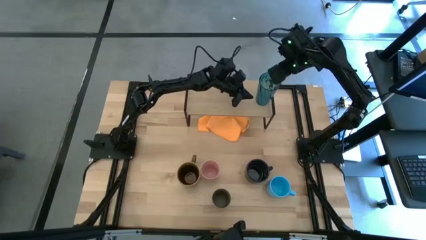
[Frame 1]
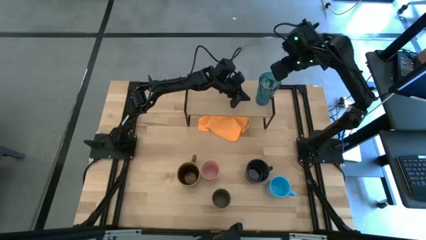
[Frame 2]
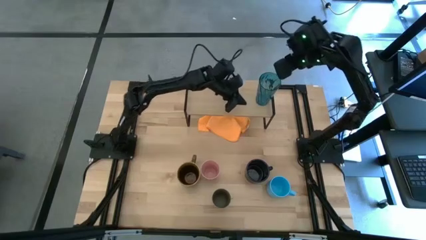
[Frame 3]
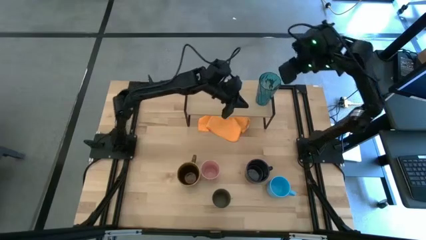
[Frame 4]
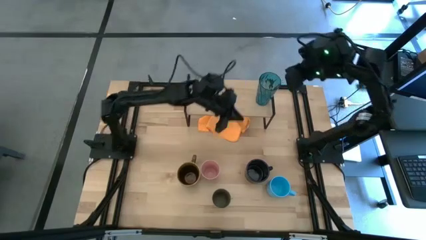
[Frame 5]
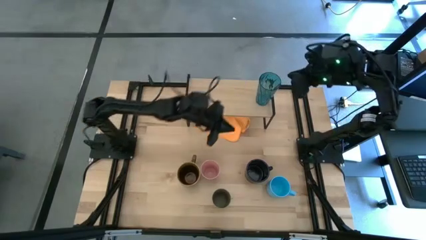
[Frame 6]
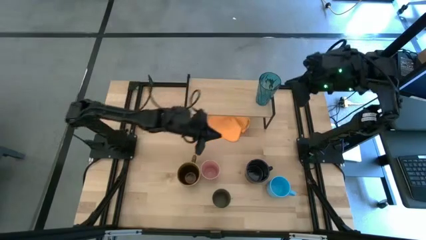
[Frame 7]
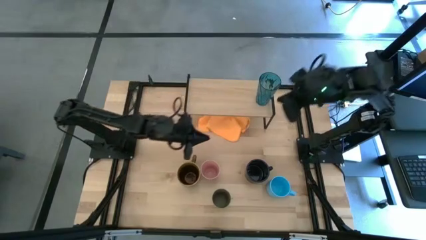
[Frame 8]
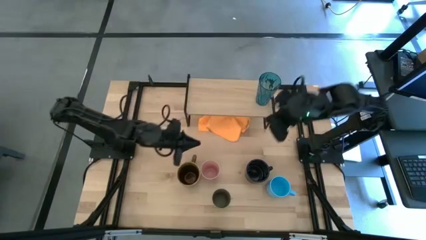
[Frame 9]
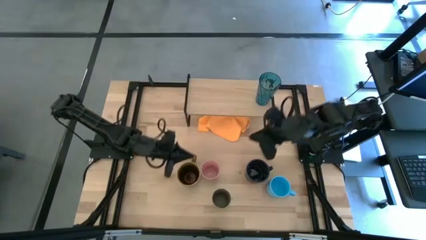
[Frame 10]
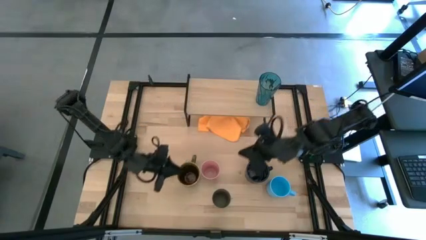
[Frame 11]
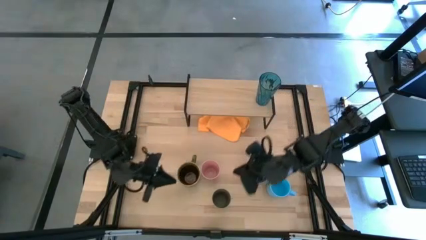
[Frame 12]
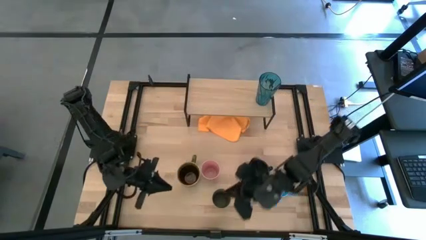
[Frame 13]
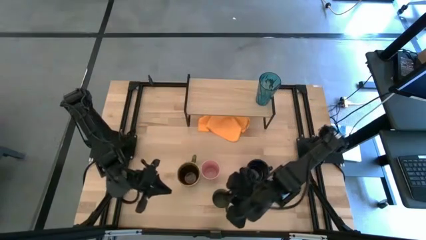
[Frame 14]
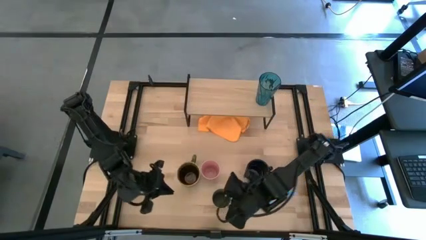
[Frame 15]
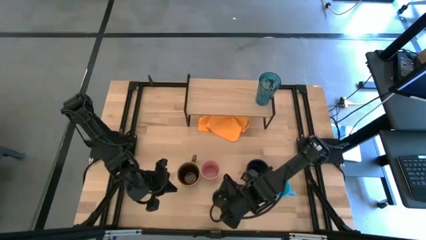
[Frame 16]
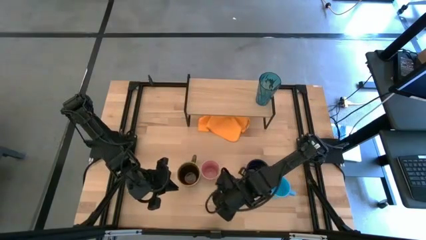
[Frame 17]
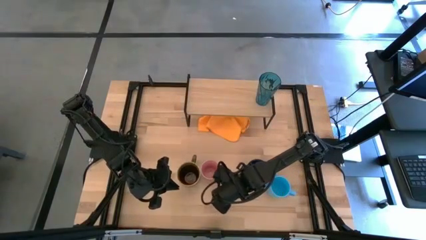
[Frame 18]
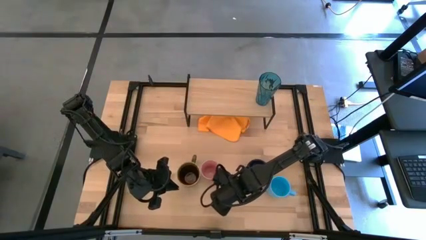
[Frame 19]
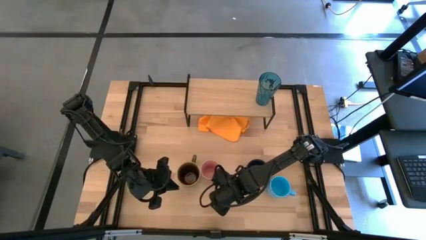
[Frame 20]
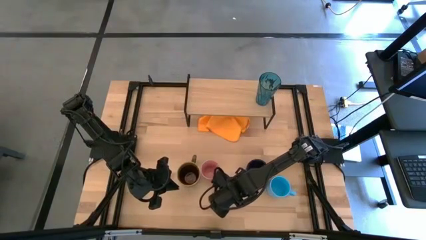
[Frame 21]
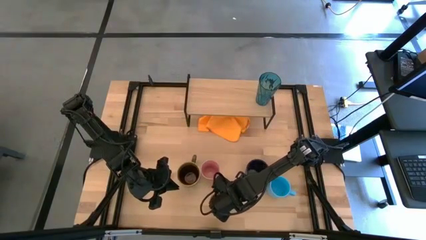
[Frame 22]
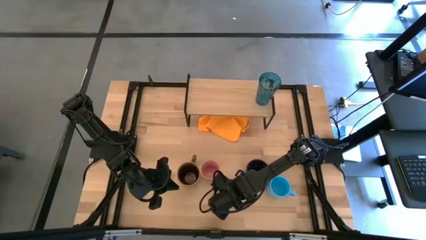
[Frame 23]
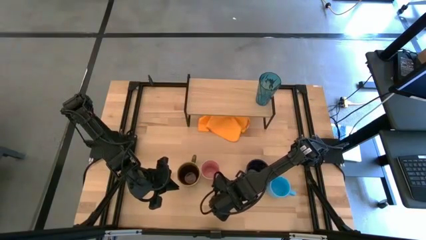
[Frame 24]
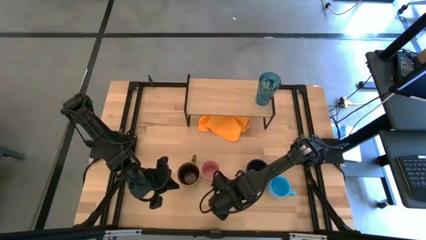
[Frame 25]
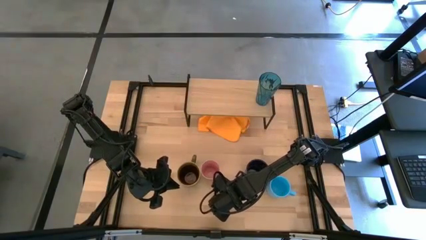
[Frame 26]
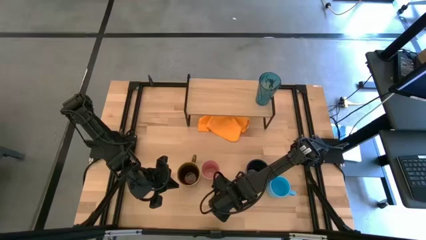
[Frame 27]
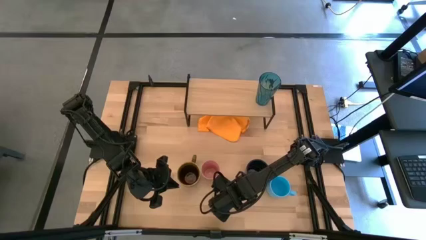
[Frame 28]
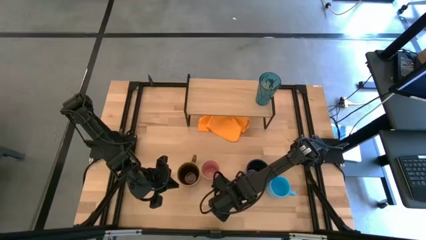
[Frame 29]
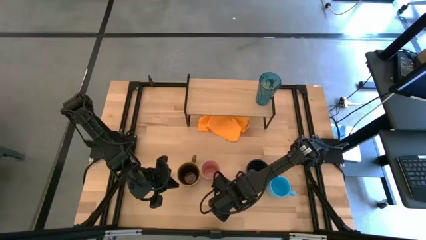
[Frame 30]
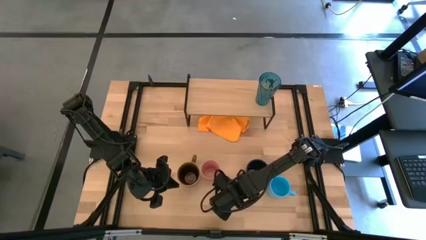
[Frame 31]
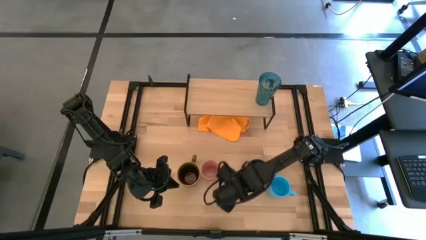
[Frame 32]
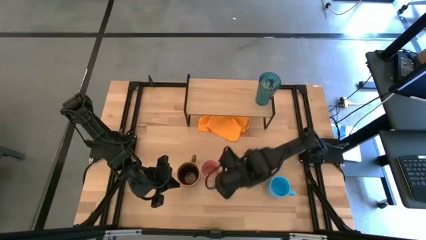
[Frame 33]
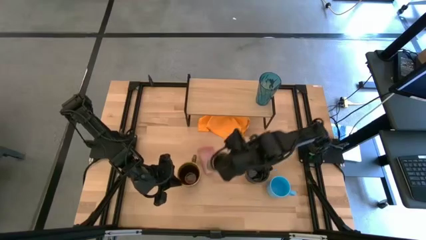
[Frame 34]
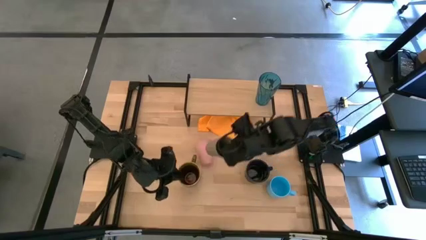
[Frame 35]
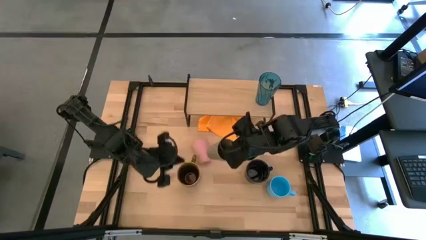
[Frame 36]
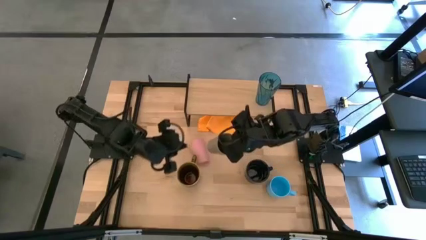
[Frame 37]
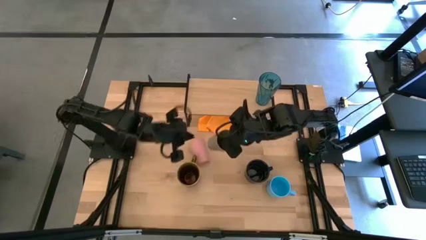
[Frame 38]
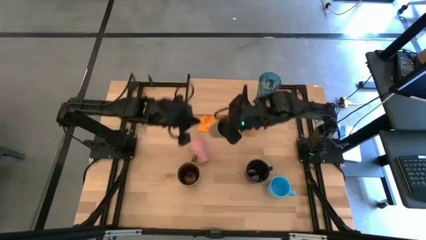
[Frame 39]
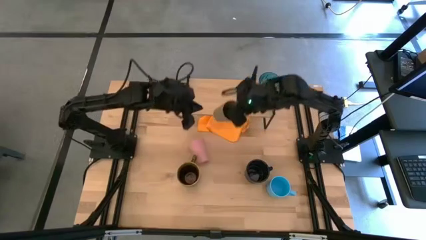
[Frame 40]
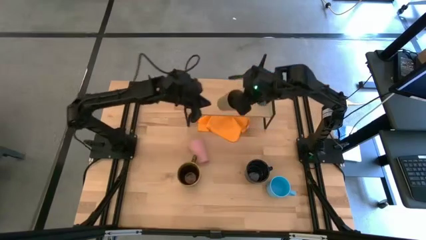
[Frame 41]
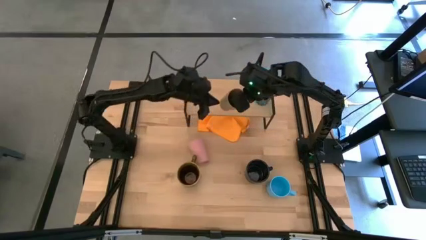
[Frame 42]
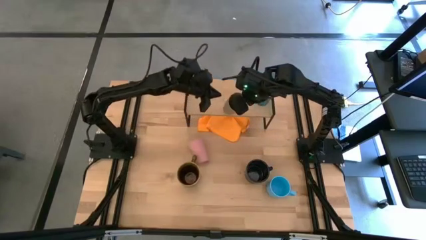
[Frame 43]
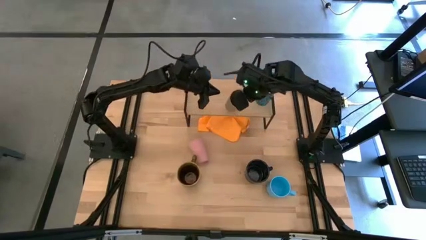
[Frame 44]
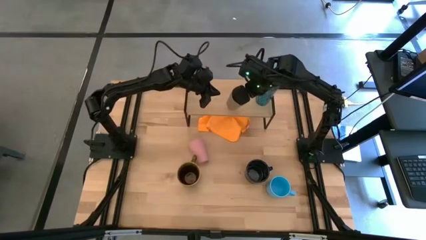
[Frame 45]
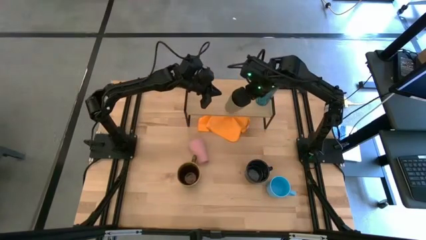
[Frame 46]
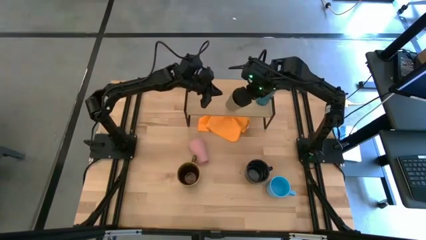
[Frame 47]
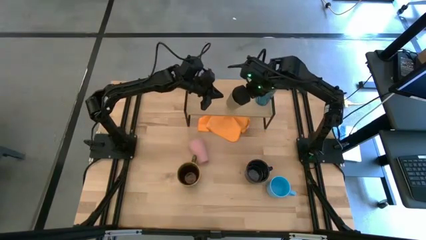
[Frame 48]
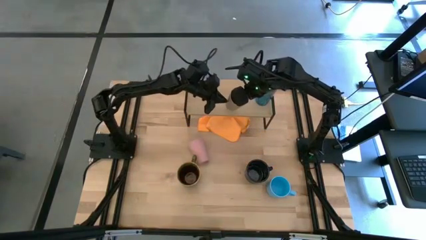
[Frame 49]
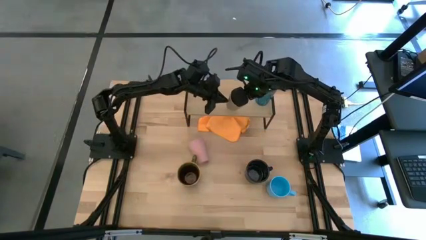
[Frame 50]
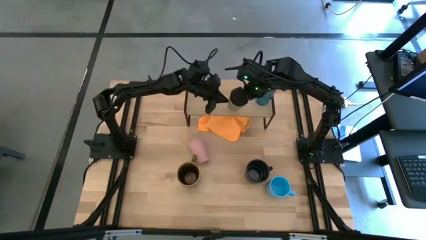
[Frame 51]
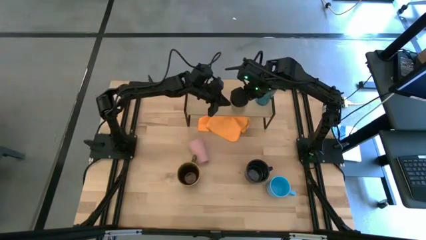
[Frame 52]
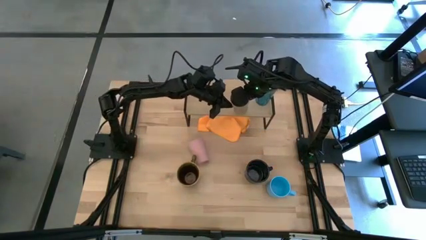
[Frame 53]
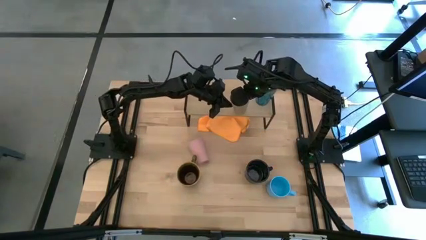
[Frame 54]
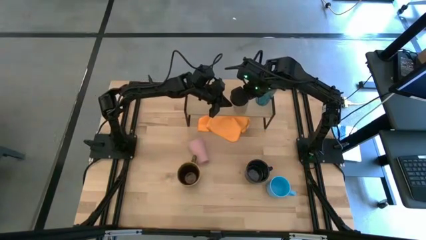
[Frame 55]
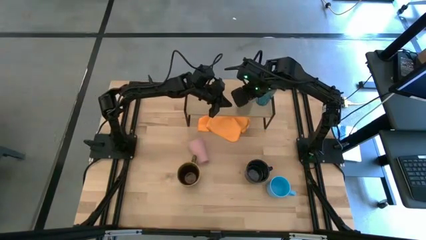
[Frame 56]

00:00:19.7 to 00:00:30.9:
Task: Stack small to large cups/mugs on shelf
Put the gray cup on the shelf

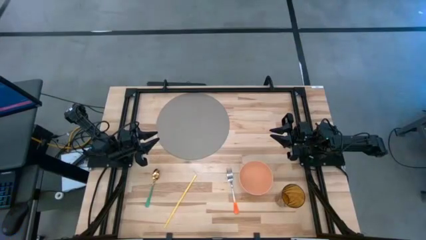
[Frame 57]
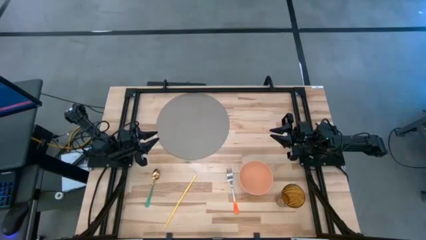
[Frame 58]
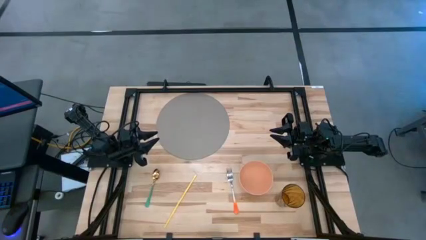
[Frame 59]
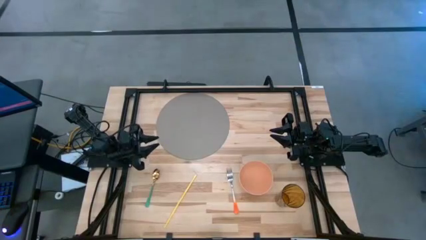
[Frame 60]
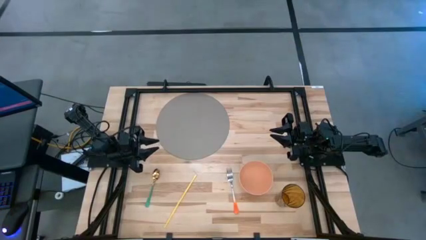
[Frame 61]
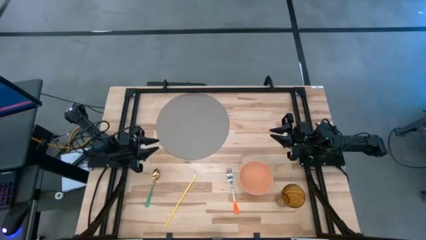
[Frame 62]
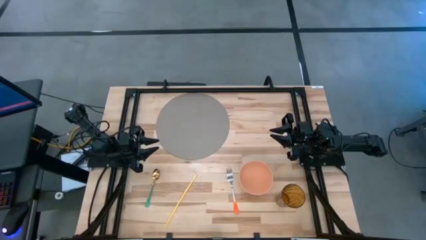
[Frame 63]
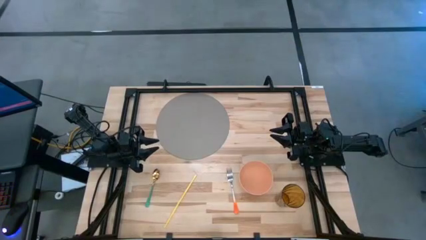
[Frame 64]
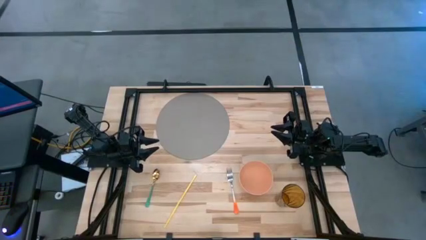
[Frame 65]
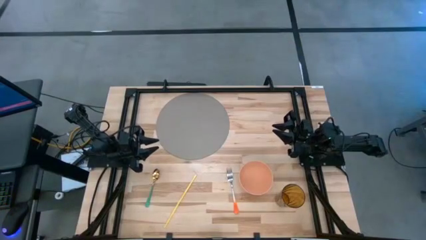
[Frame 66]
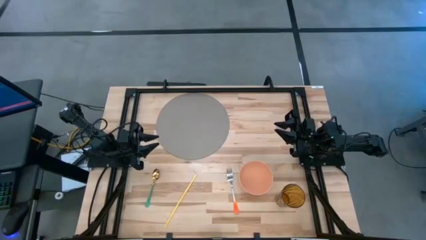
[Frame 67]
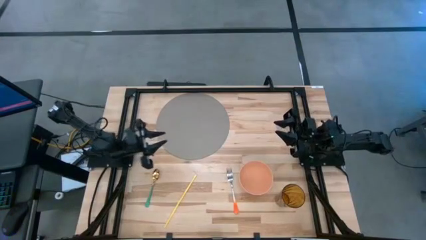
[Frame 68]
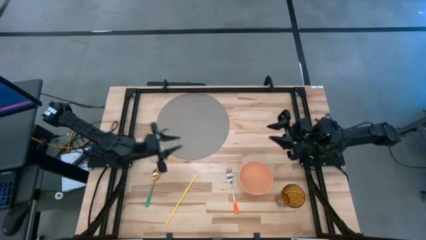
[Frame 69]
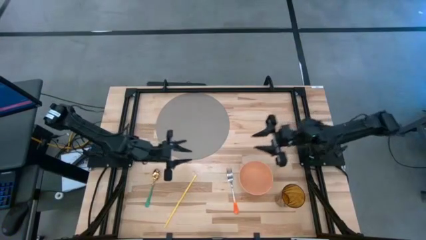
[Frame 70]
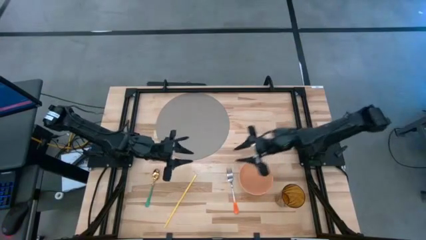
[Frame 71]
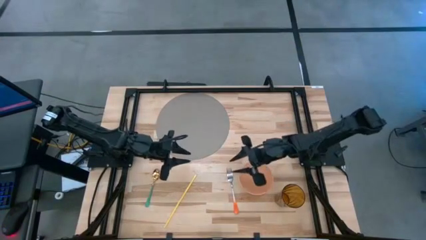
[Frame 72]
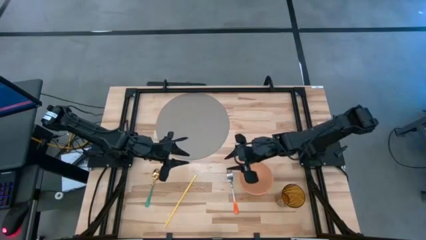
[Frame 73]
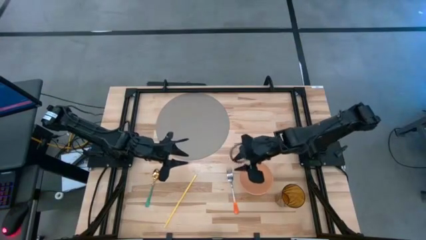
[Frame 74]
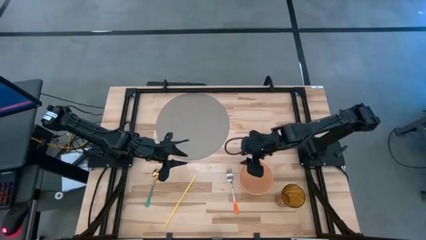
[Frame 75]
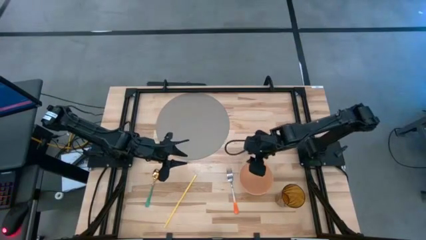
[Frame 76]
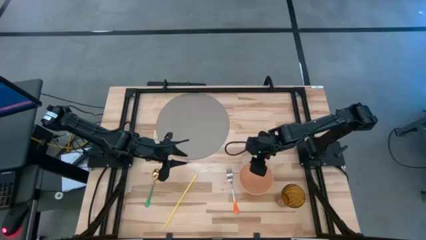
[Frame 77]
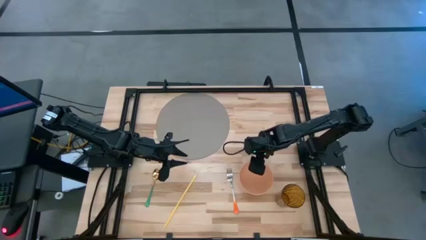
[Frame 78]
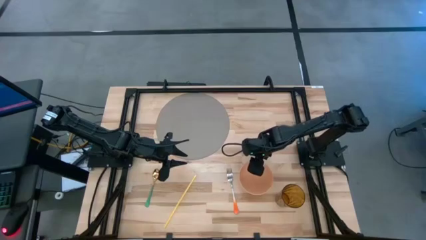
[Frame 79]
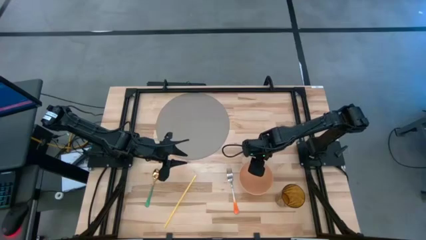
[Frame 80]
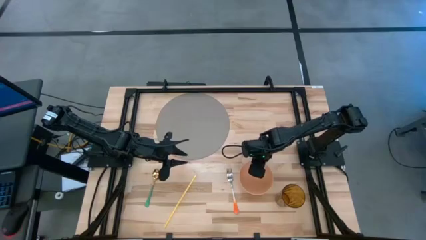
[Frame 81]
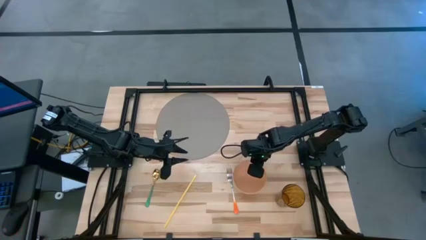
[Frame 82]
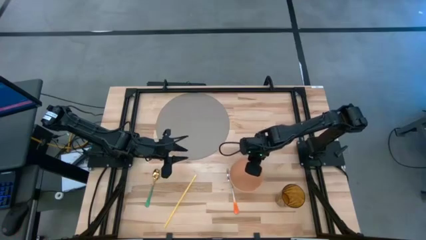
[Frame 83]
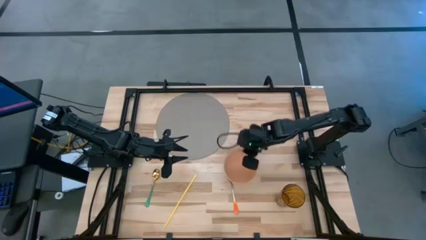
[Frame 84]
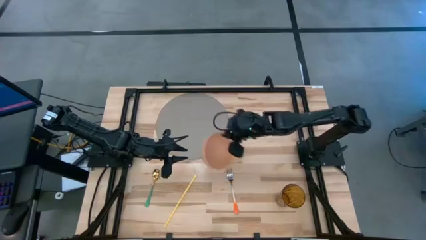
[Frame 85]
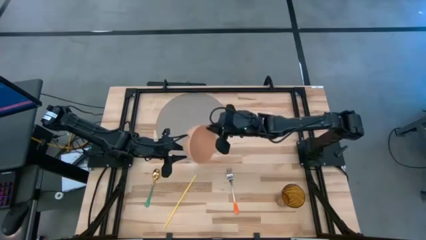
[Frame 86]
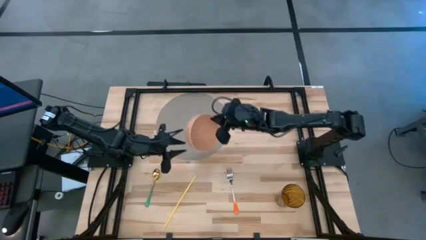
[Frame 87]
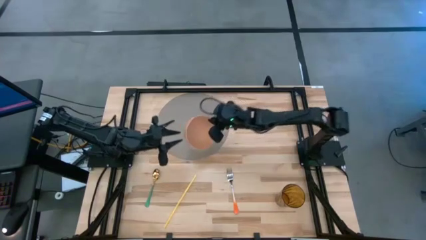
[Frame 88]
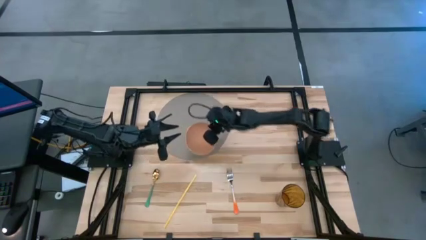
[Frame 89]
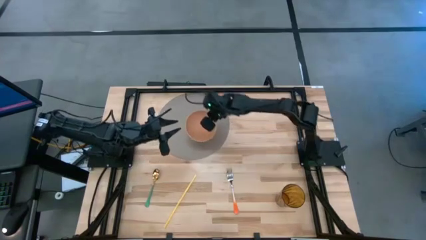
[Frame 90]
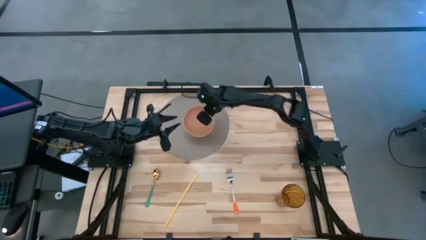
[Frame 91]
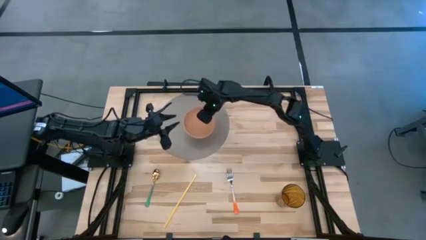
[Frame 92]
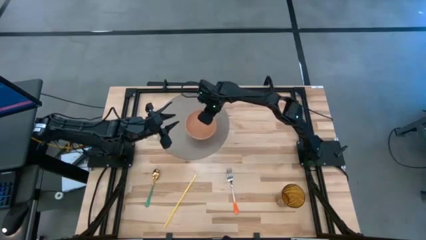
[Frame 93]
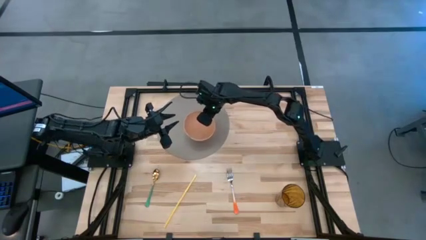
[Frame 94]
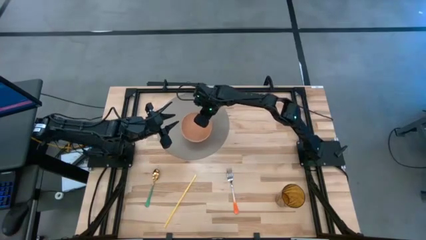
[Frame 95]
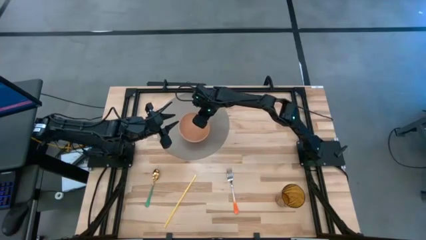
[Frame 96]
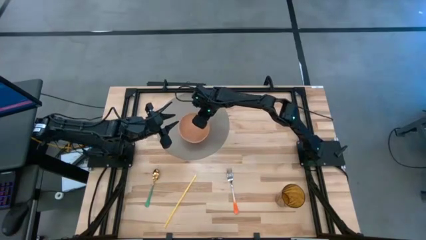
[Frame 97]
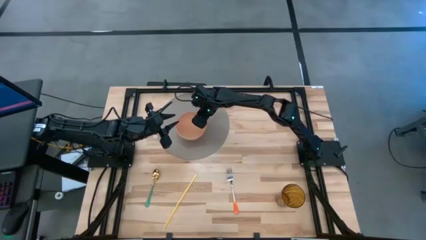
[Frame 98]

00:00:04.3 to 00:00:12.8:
Task: Pick & Place Utensil
Put the orange bowl on the center of the gray mat
